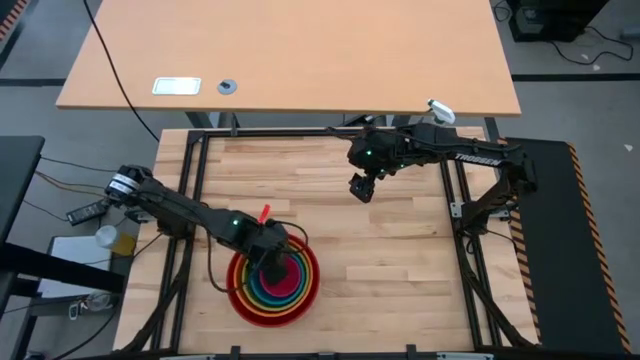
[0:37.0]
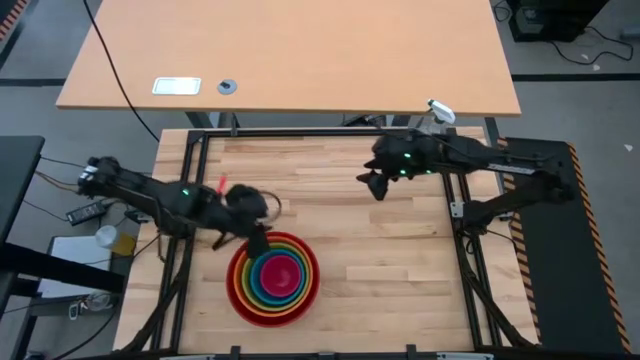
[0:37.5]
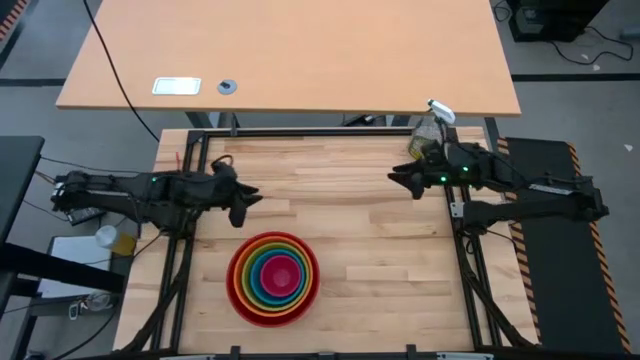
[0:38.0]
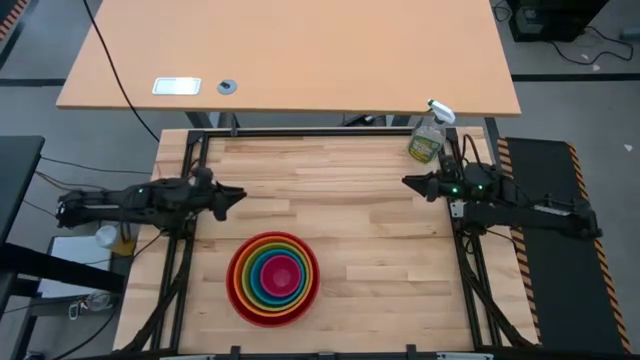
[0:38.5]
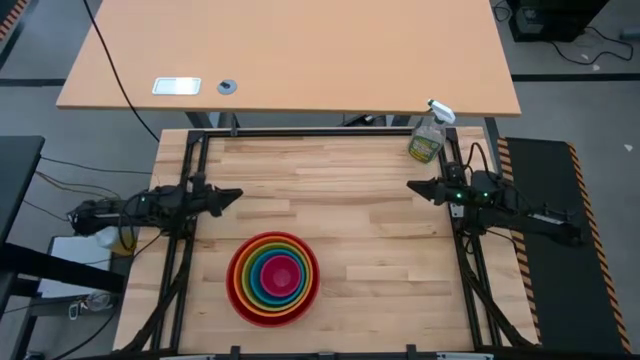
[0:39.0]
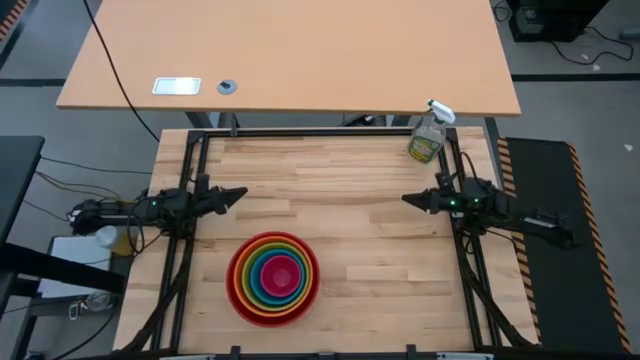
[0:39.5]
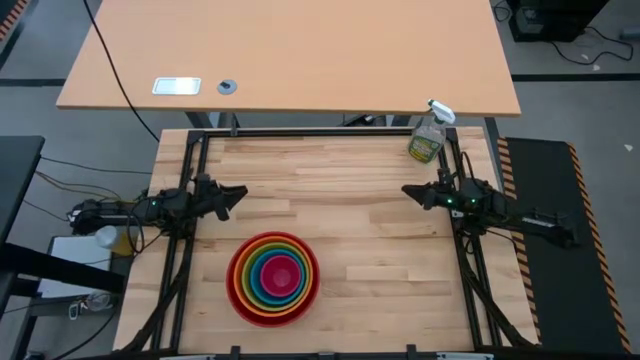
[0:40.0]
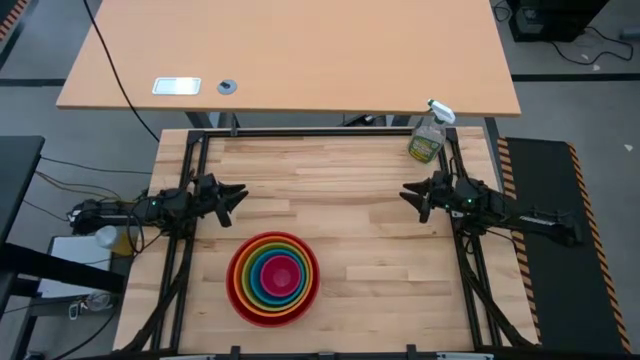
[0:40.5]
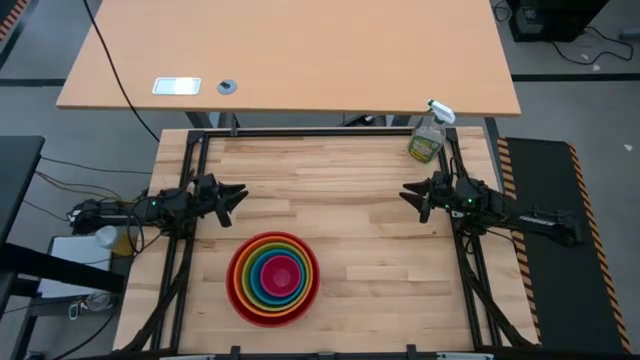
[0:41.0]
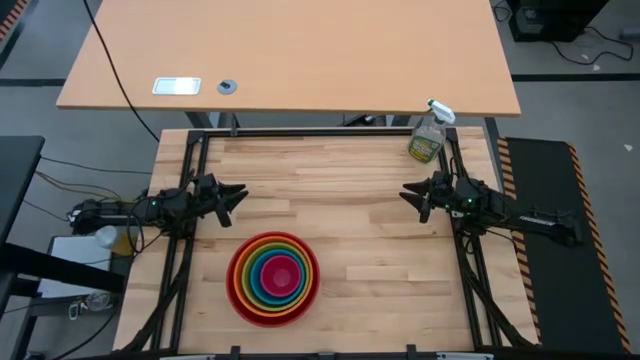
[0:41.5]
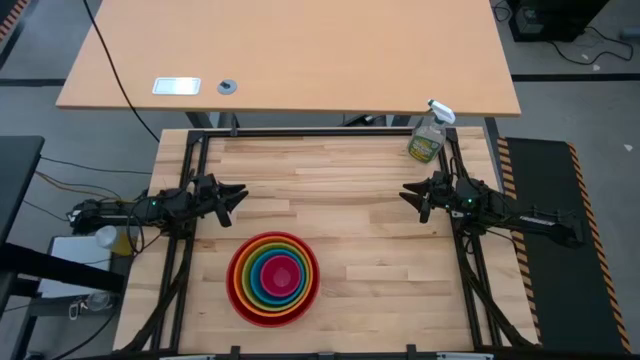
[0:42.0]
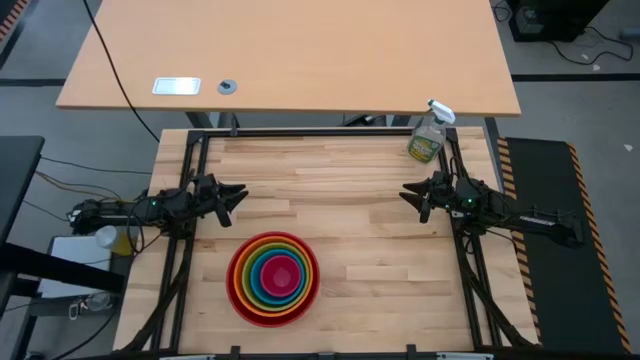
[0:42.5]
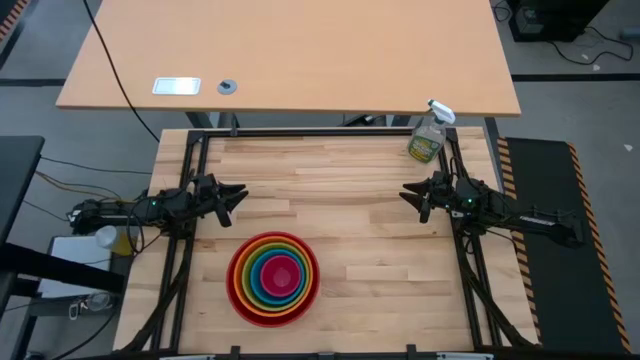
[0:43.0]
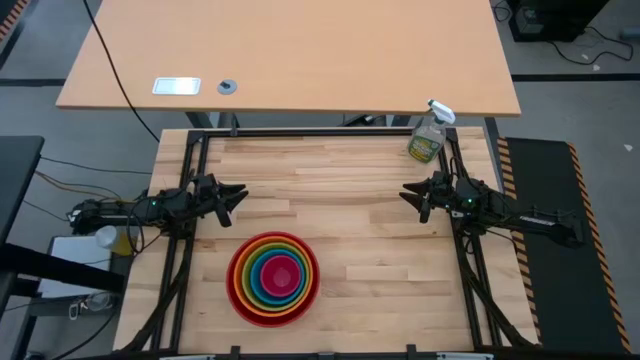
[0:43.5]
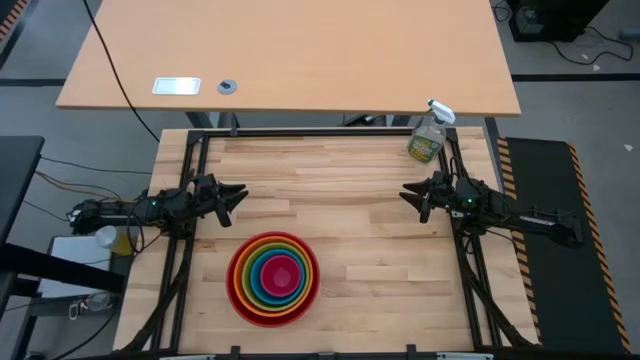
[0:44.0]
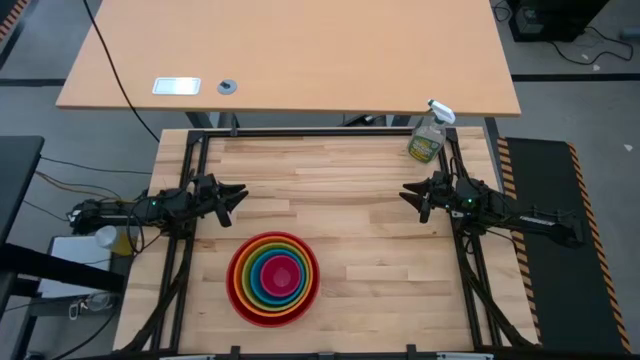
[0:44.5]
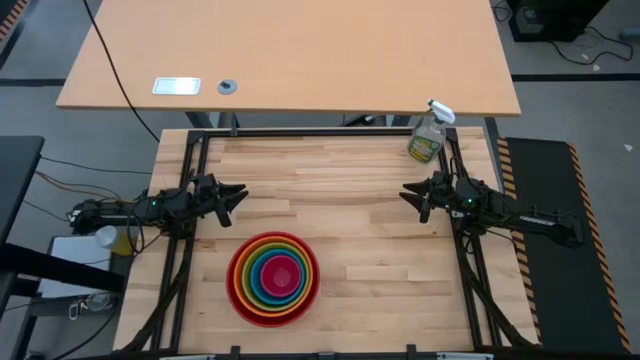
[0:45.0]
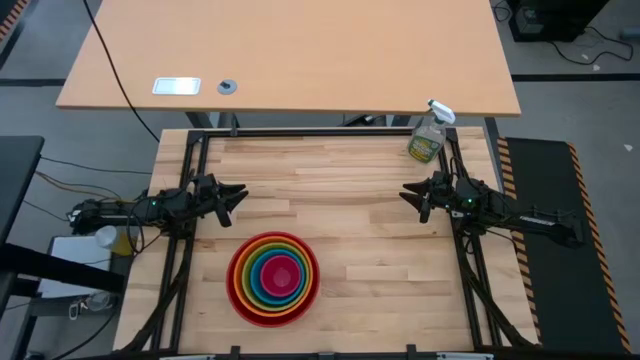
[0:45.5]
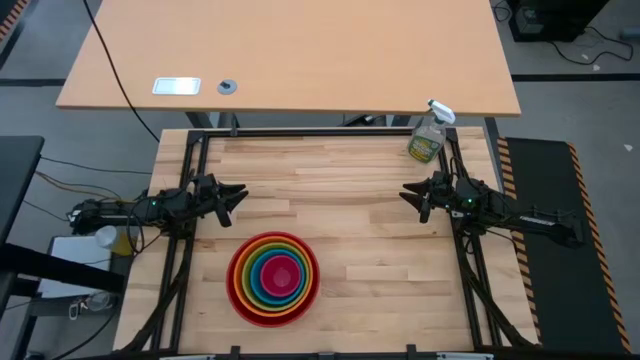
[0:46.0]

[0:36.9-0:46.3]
Return to Home Position
